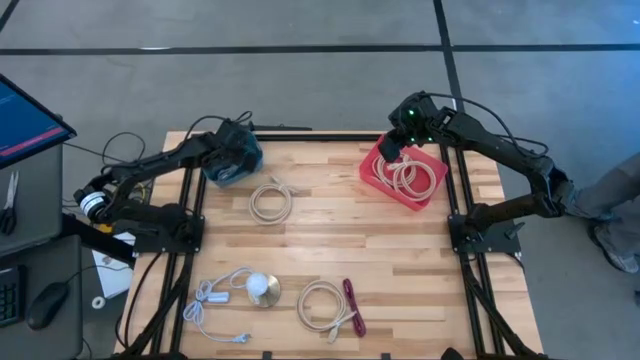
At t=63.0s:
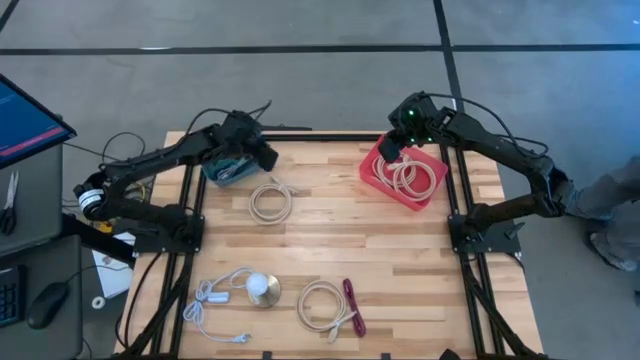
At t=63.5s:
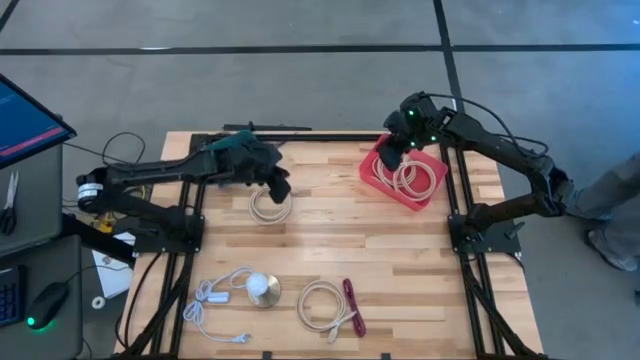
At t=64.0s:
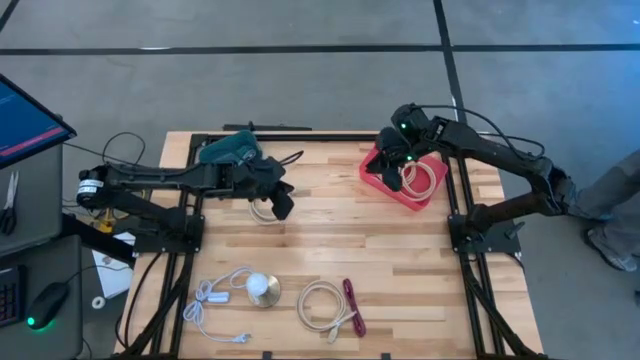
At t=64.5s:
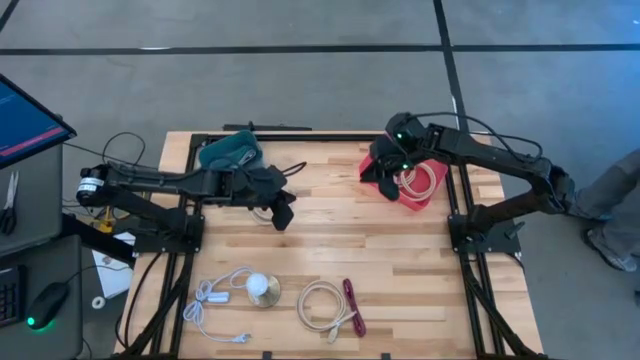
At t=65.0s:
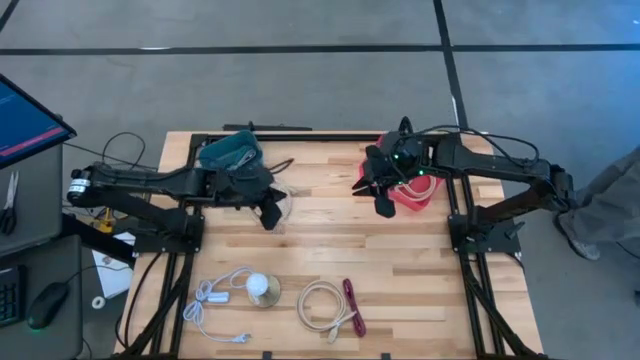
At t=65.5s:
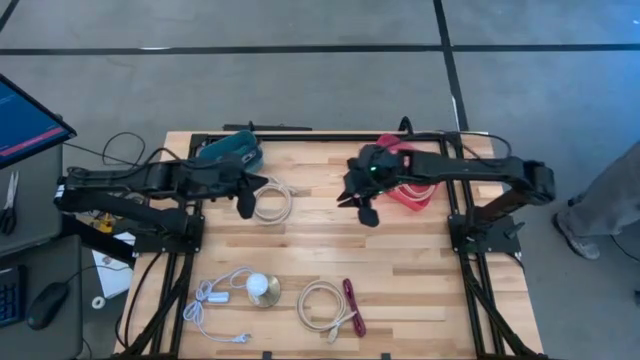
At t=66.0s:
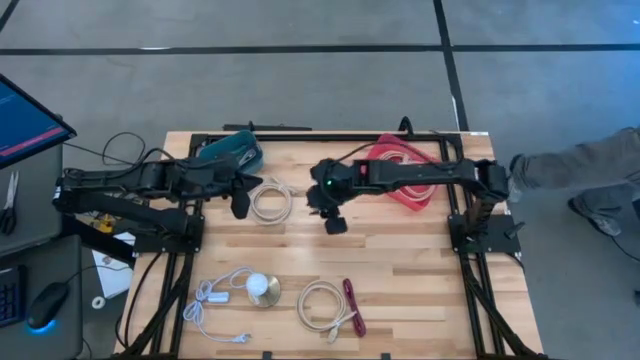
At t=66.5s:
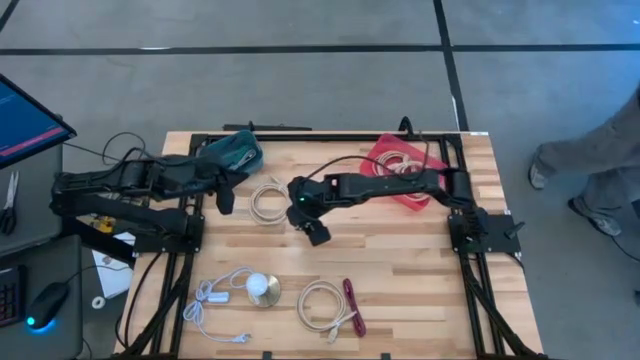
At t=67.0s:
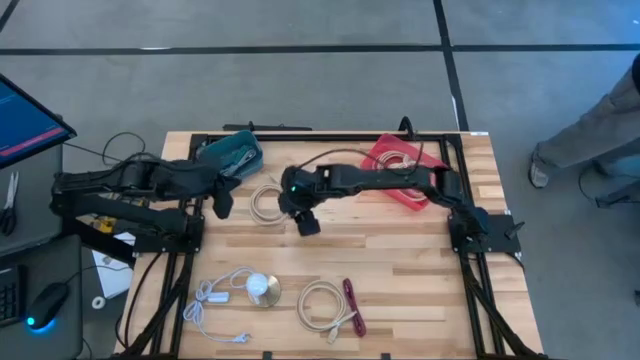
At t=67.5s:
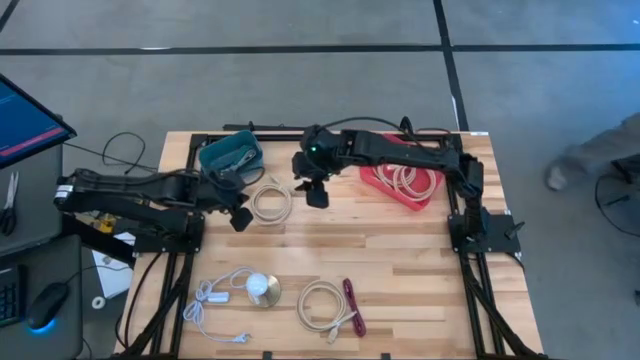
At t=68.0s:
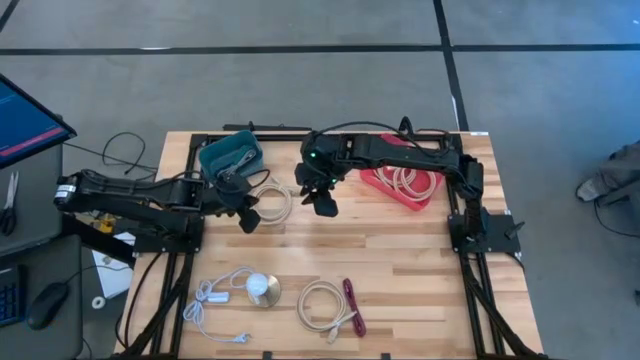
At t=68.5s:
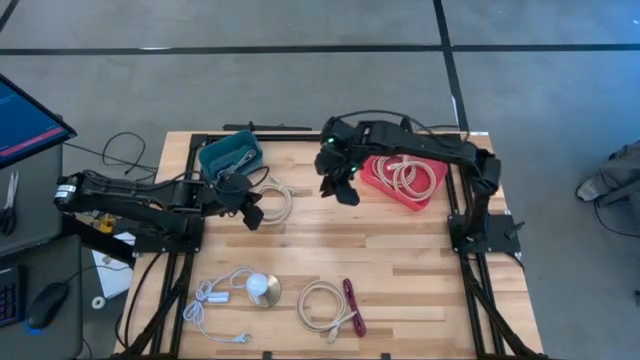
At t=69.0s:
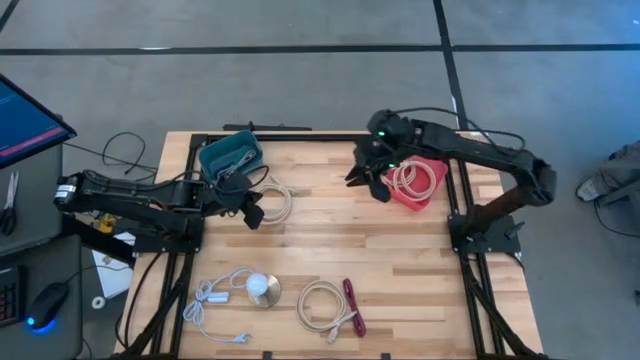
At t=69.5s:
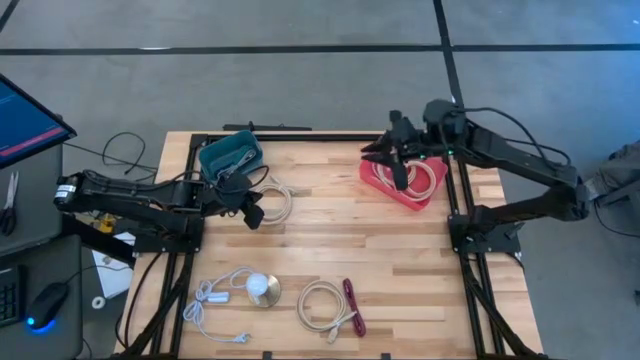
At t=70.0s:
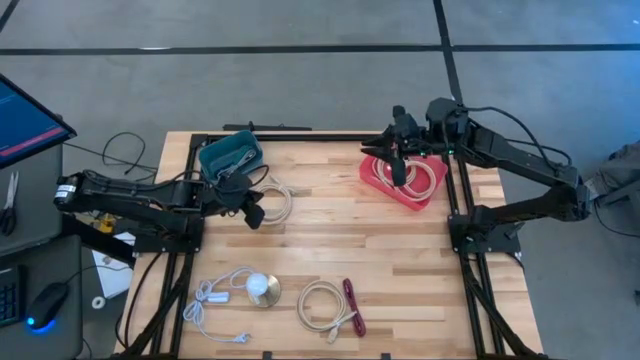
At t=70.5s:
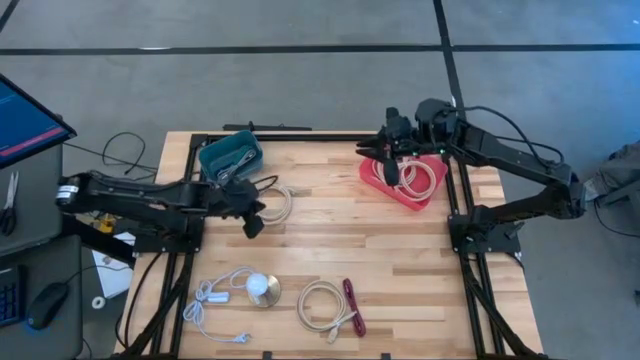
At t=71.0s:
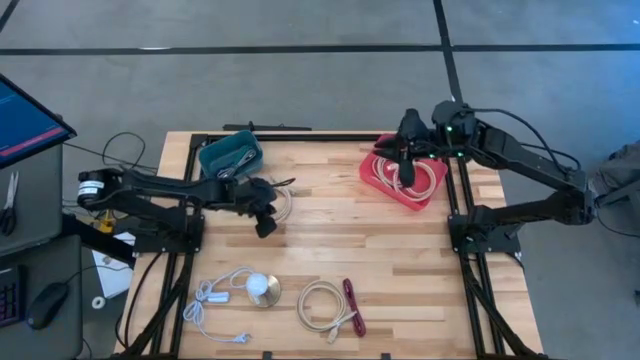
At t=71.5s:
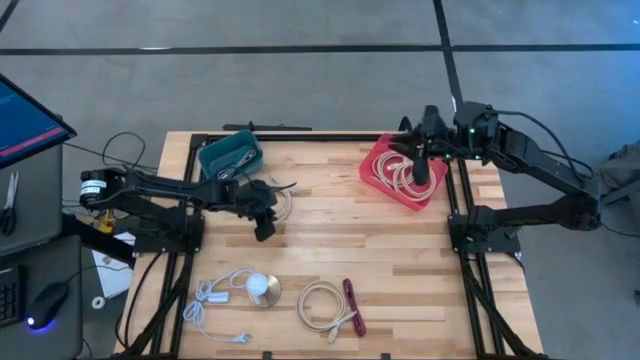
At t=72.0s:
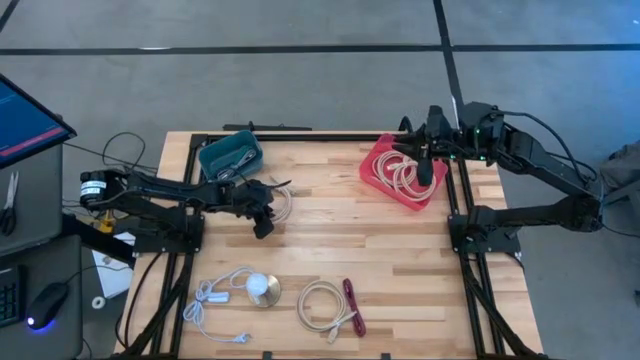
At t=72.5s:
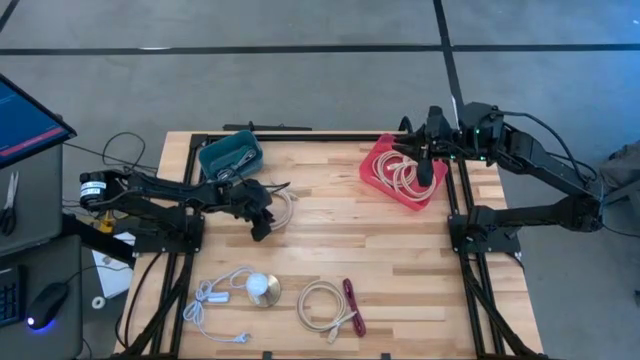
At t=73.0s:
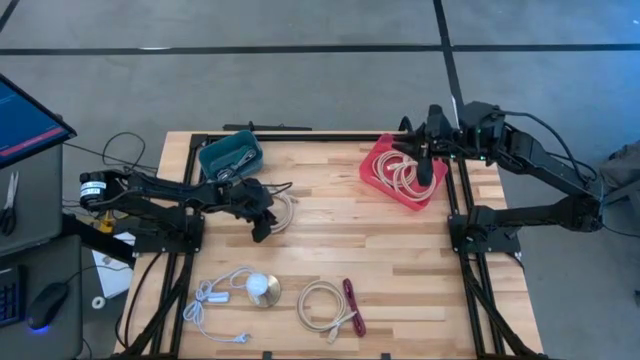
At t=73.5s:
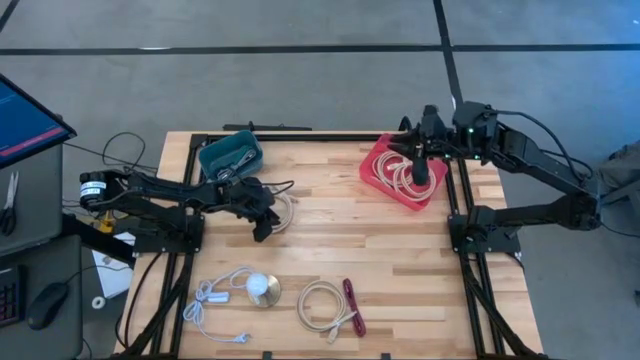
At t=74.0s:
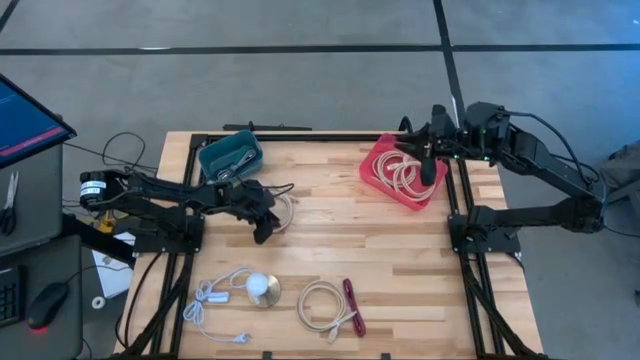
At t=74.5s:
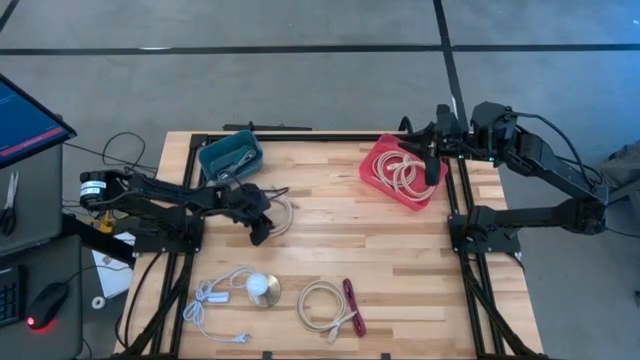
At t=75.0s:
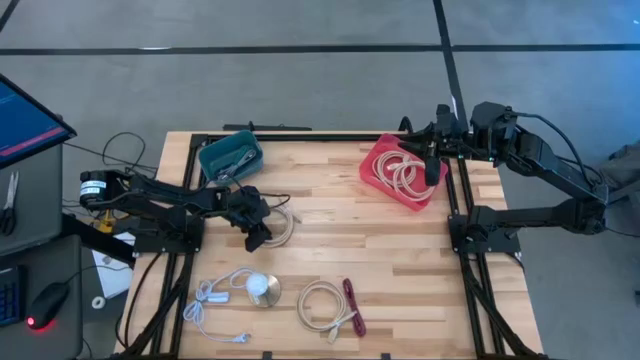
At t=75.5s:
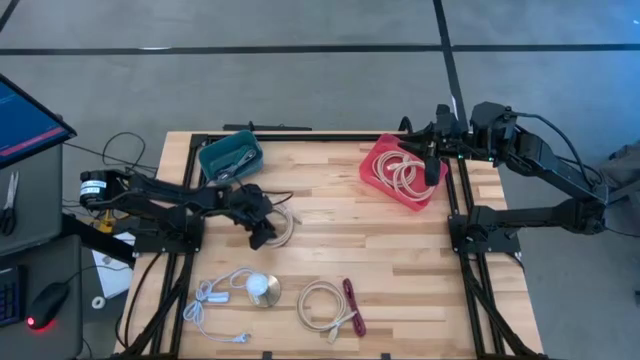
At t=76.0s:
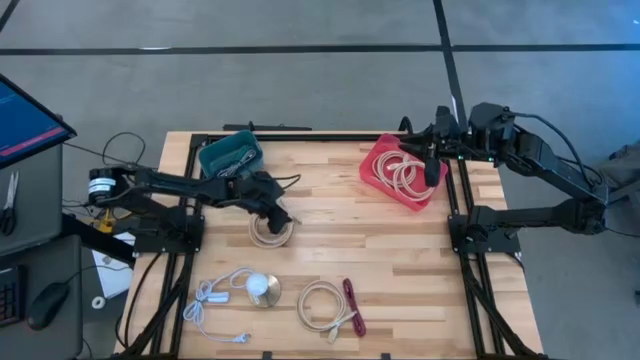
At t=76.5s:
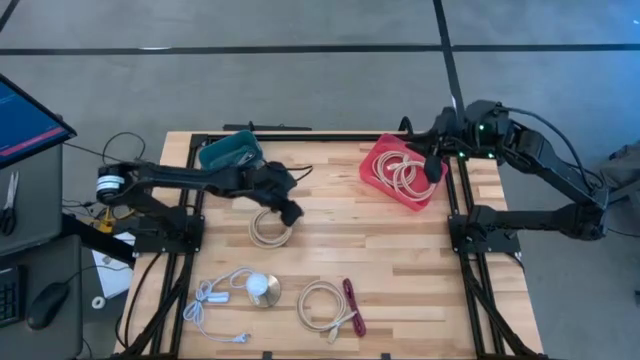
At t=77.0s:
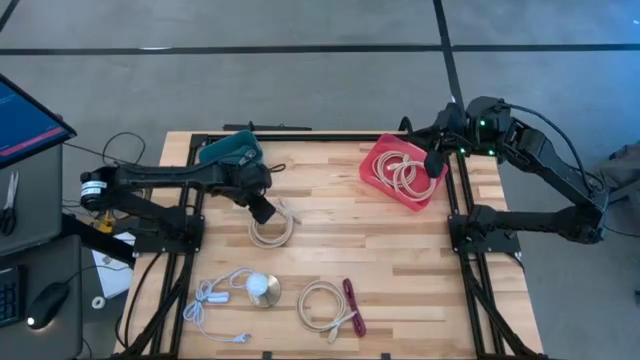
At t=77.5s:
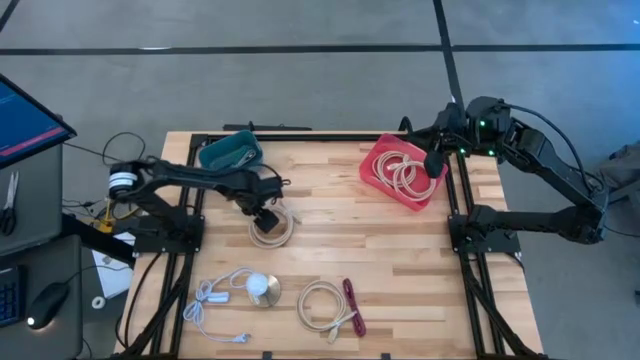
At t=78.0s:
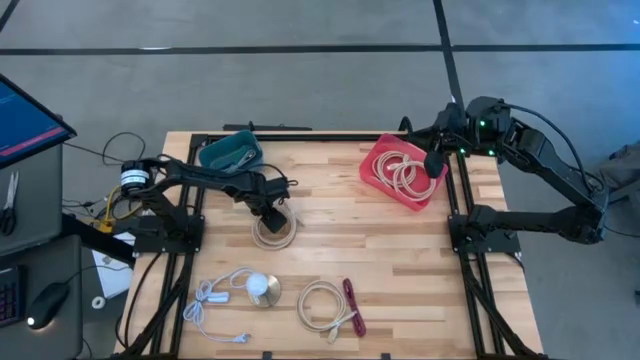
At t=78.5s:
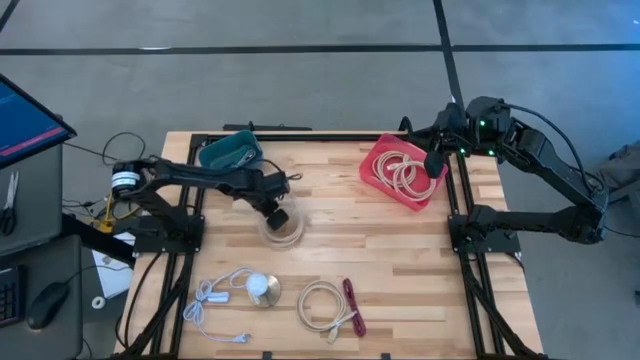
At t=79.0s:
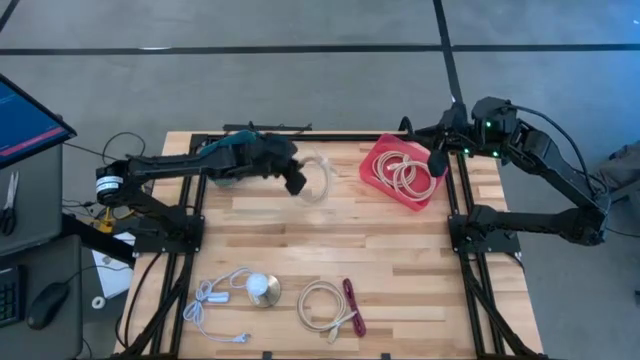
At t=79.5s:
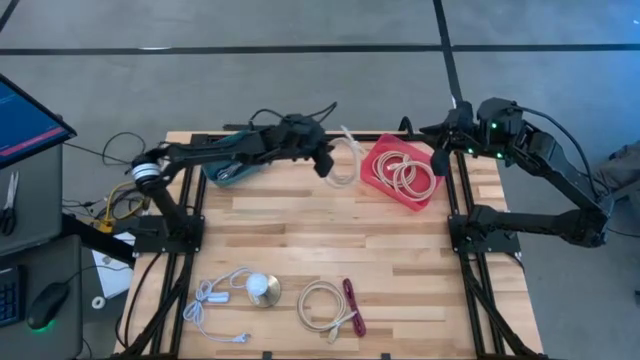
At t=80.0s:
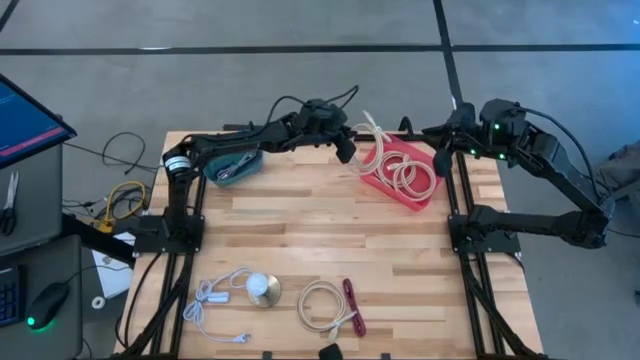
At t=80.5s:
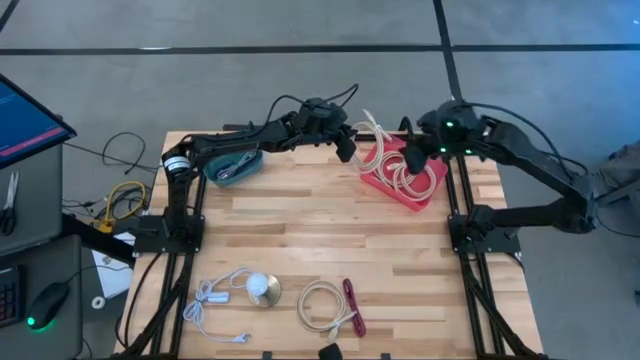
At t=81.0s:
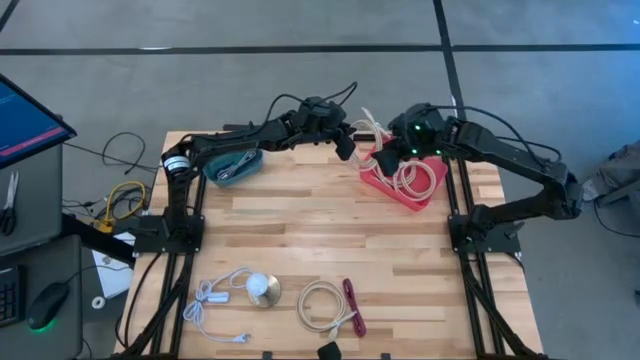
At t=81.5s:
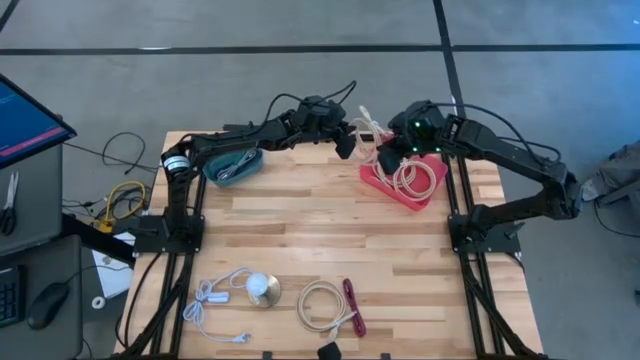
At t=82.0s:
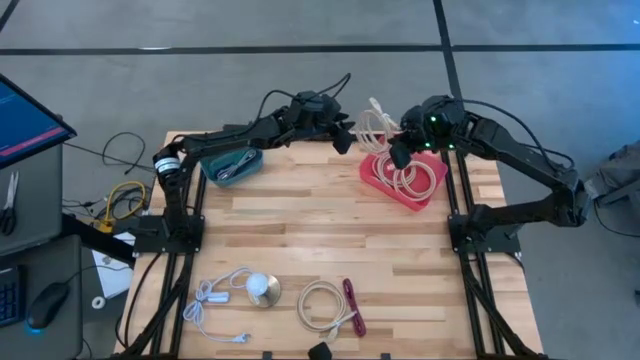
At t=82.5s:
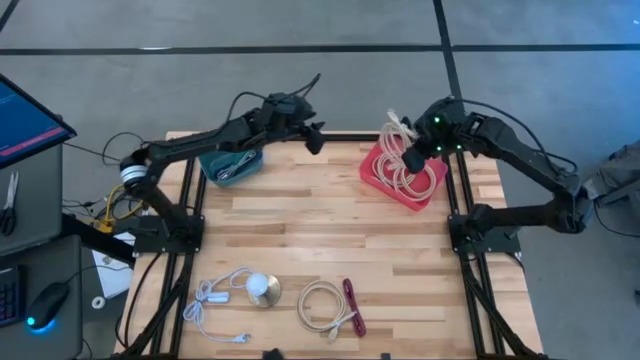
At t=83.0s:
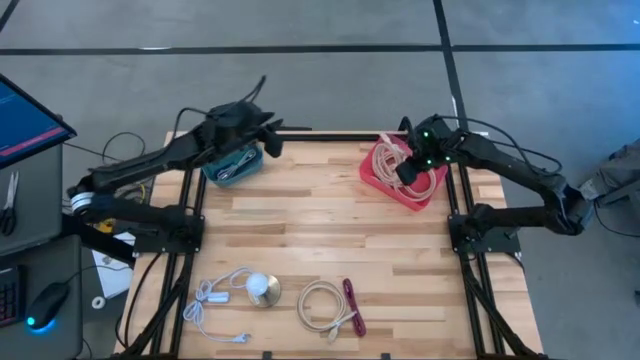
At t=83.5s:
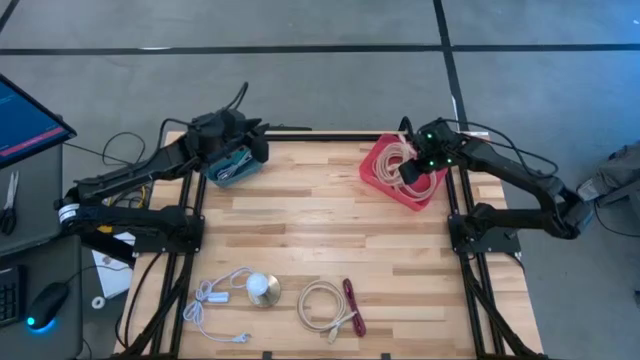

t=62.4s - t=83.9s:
Task: Pick & Place USB Port
Put the white charger cable into pink bin
